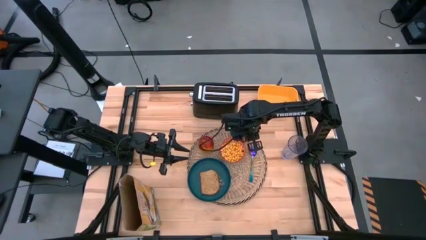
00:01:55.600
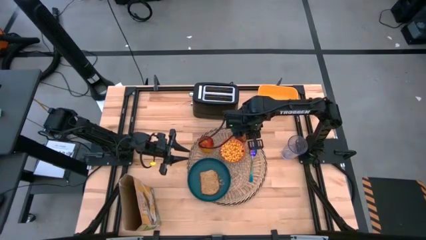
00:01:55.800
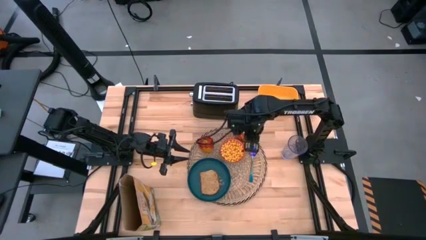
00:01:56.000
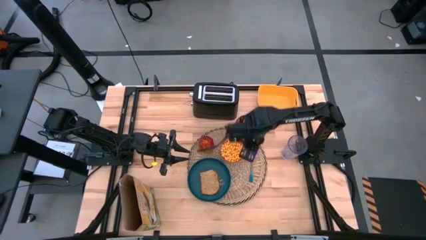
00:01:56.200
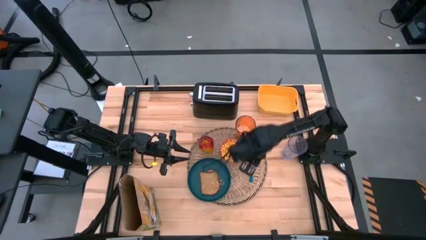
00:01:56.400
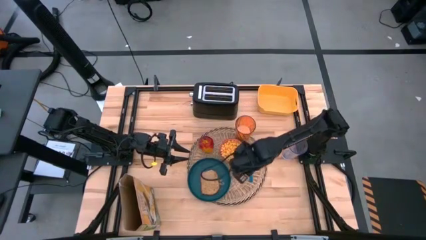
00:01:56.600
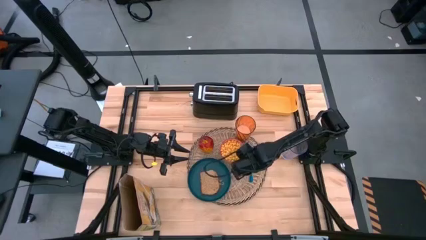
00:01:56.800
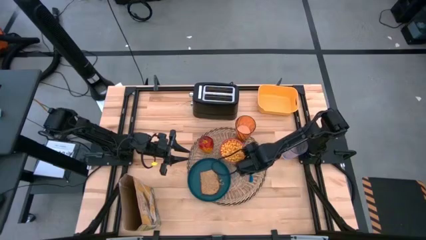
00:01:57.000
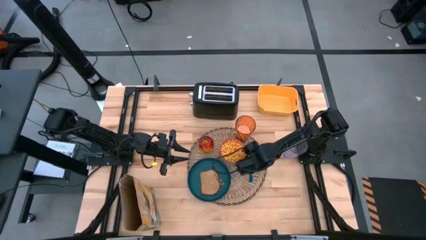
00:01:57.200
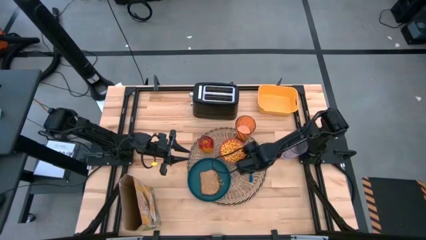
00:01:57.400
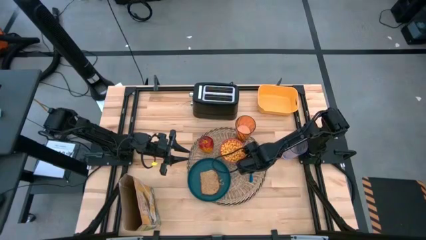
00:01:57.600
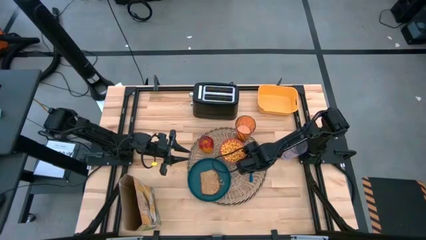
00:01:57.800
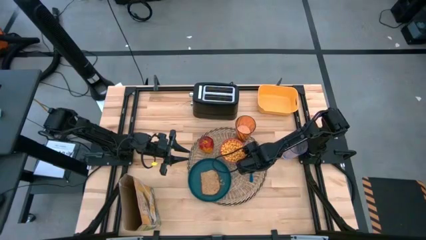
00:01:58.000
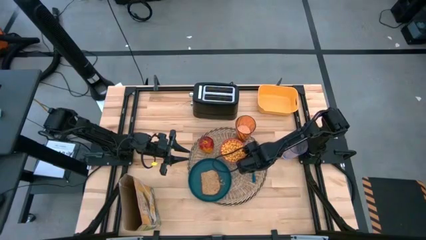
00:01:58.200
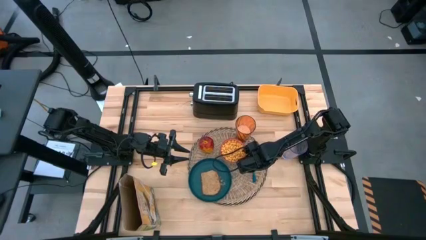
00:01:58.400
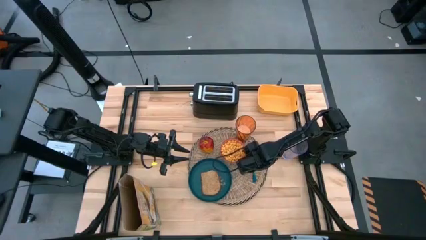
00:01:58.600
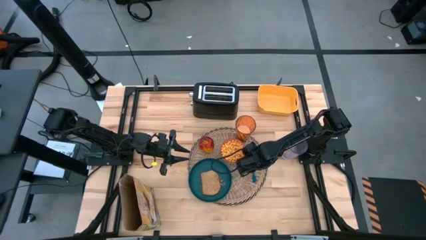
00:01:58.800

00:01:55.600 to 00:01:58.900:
Task: Arrange a breakfast setting
Adjust the blue spoon on the brown table mat

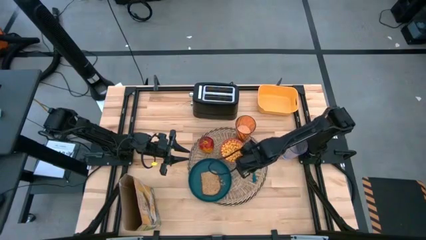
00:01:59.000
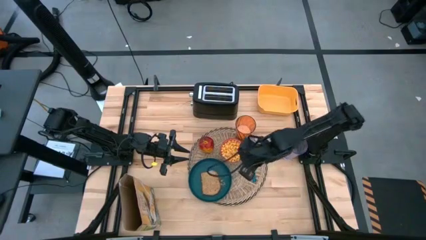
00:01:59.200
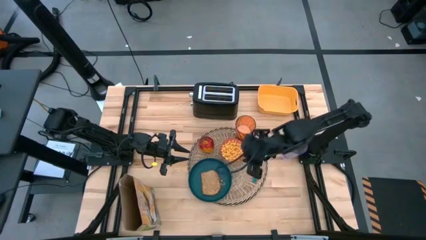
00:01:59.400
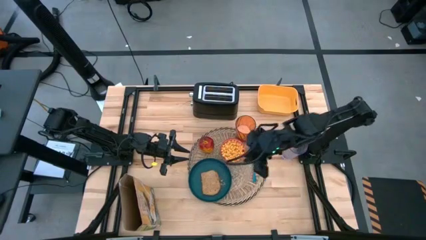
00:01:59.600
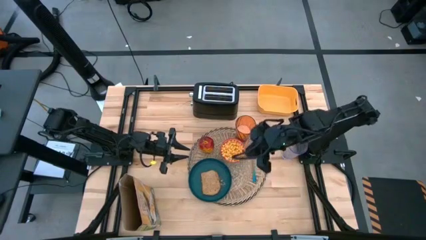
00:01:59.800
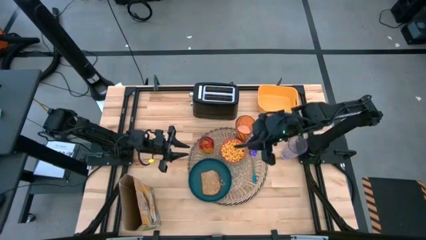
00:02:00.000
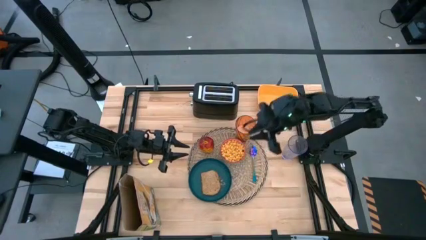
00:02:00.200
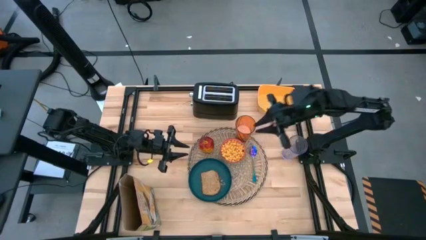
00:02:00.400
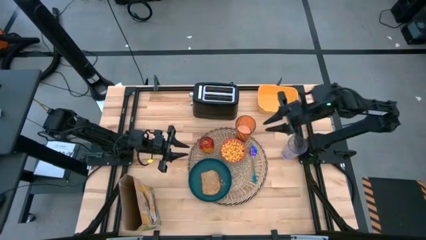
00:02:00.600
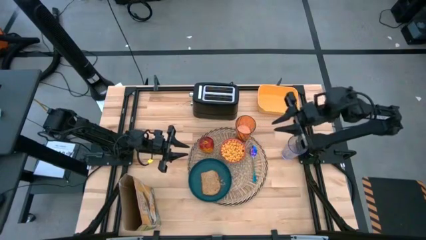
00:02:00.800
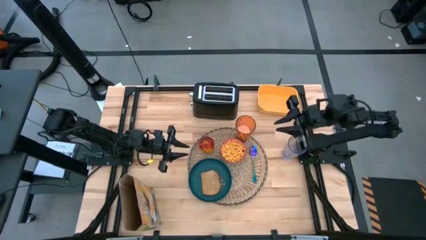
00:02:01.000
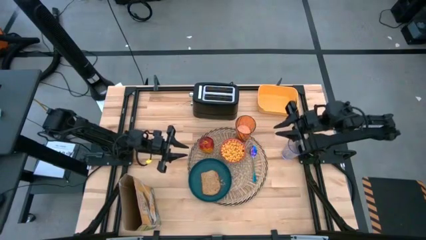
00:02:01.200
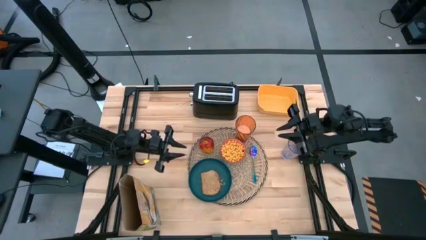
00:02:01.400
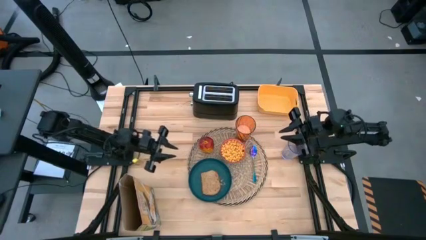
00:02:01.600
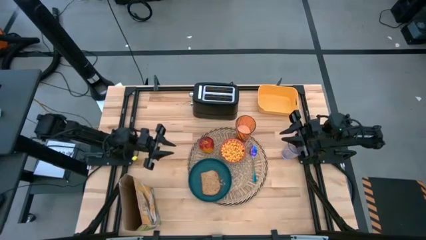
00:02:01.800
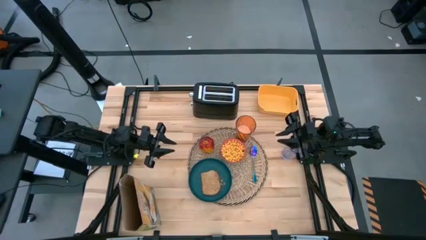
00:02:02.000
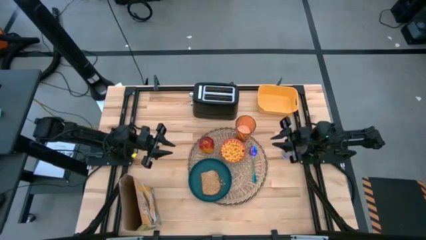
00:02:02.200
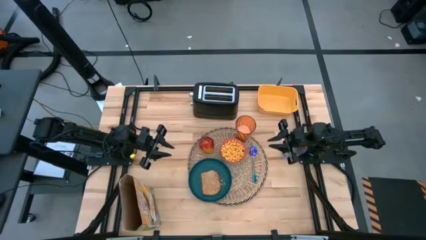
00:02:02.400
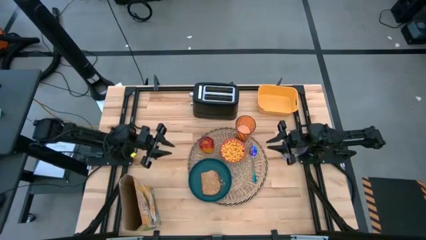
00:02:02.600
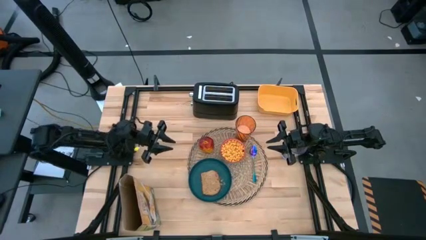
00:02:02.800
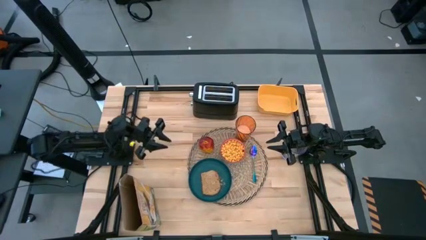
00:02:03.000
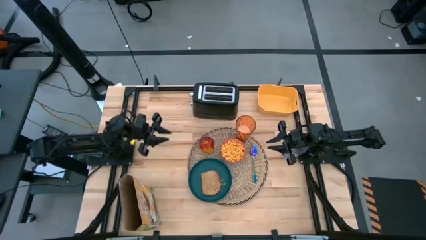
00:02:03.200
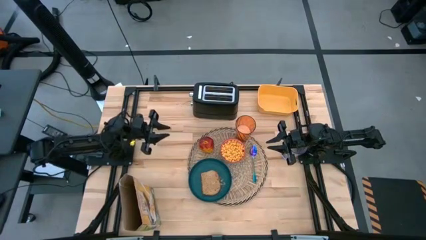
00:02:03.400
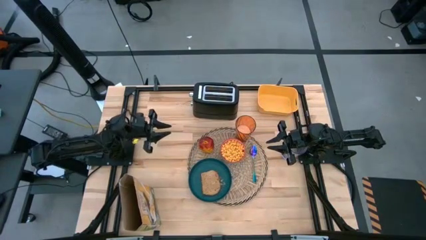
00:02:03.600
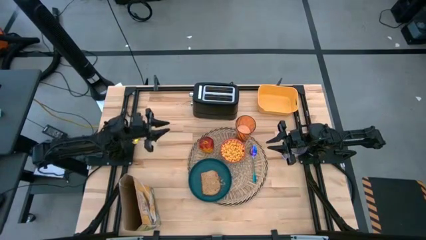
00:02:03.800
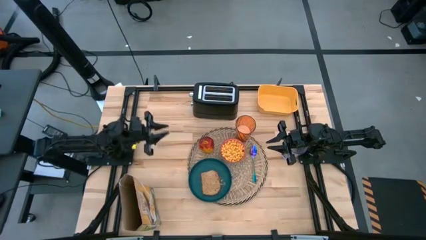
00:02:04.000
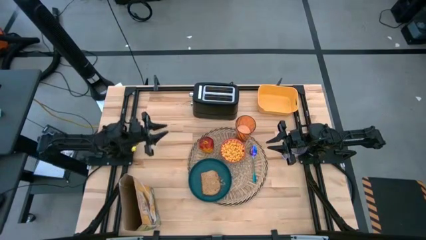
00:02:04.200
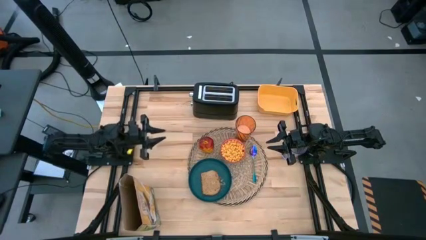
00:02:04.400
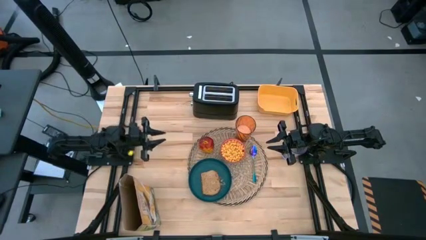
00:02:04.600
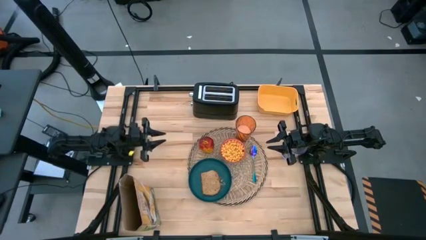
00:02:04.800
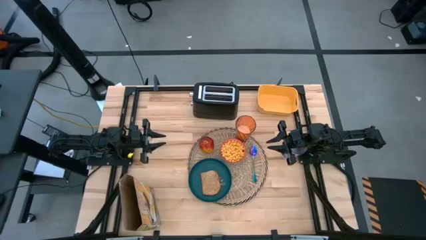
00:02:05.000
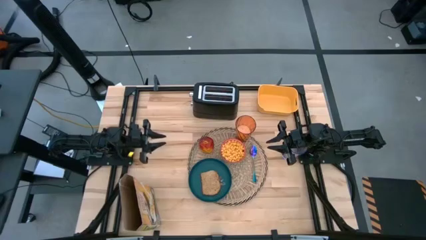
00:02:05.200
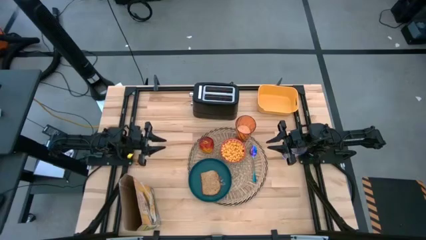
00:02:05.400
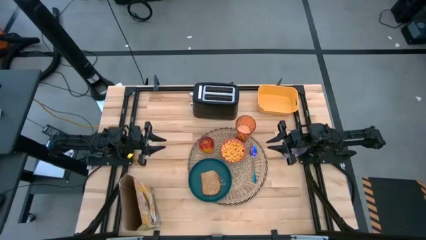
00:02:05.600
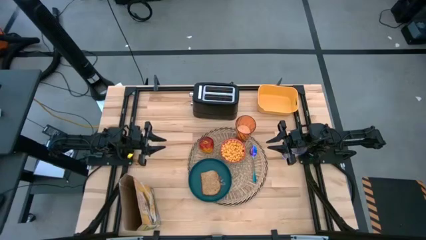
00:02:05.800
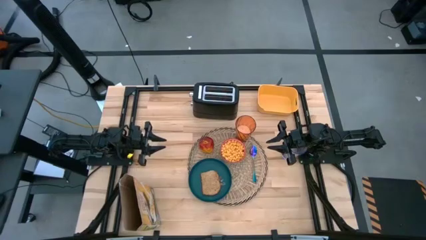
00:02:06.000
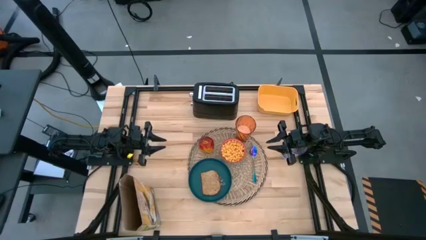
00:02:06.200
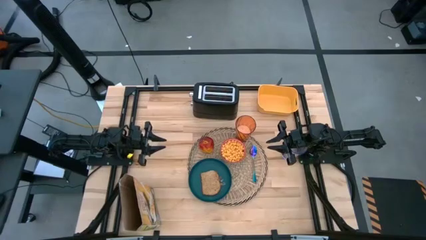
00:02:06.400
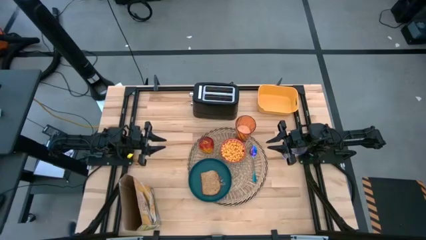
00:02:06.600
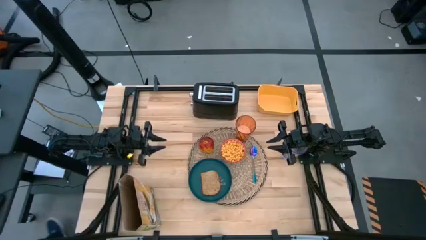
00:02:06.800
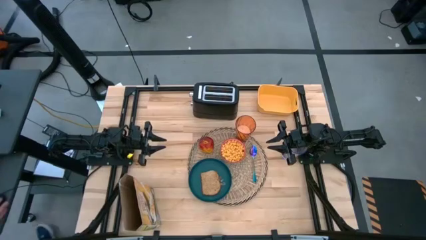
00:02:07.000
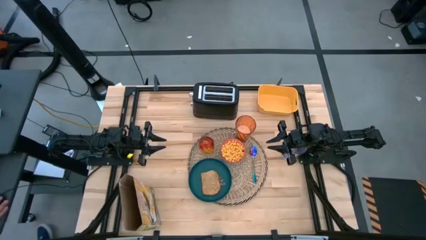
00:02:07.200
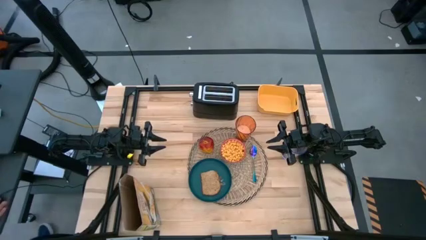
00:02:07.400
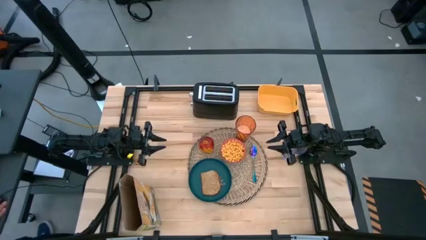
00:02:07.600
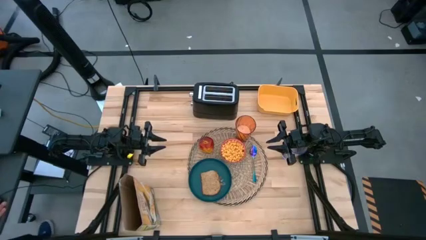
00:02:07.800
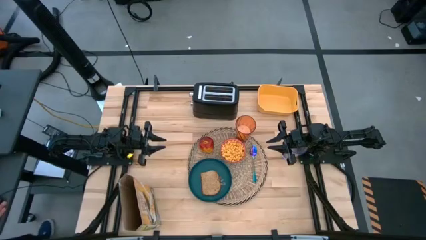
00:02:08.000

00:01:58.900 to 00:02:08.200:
Return to Home Position

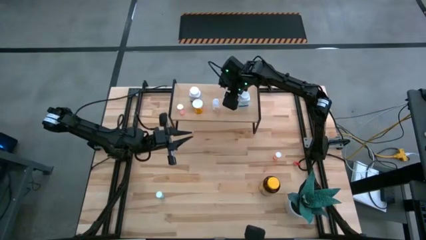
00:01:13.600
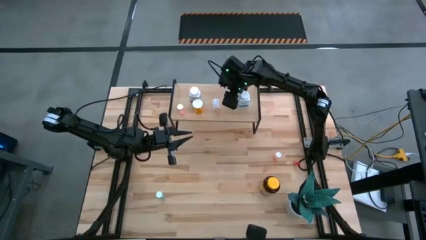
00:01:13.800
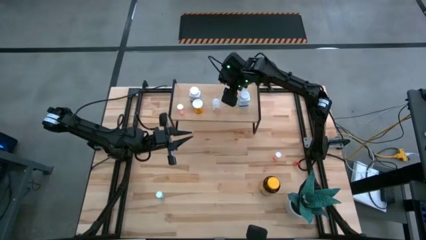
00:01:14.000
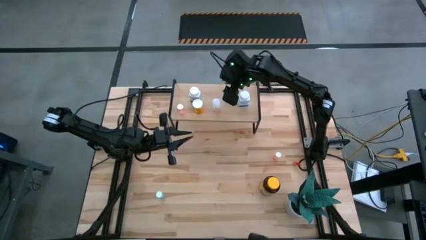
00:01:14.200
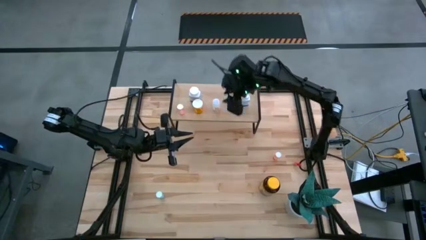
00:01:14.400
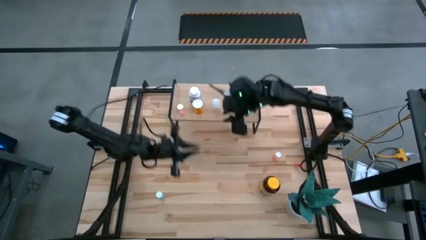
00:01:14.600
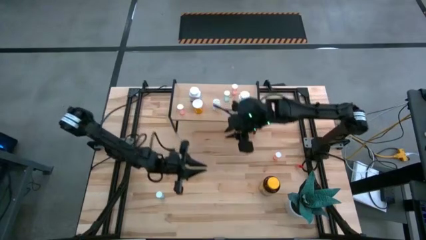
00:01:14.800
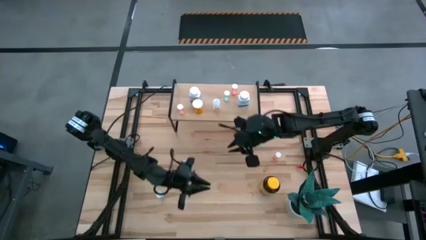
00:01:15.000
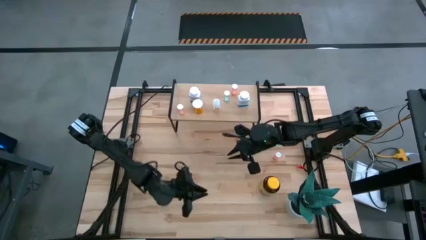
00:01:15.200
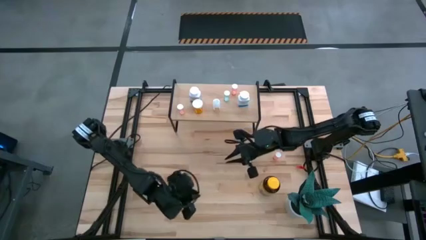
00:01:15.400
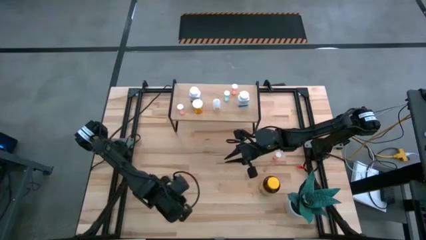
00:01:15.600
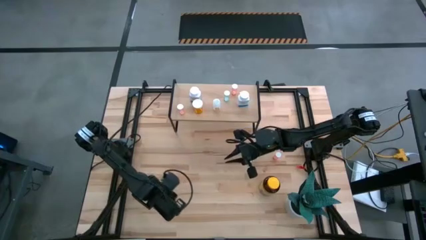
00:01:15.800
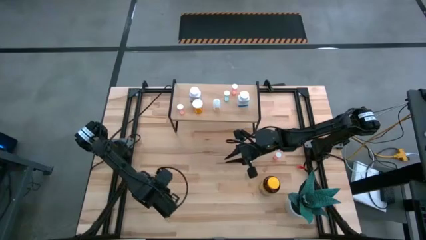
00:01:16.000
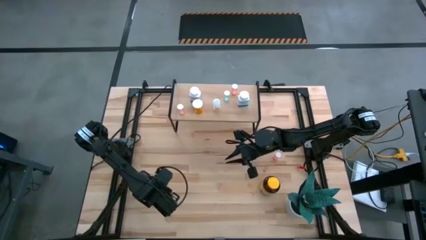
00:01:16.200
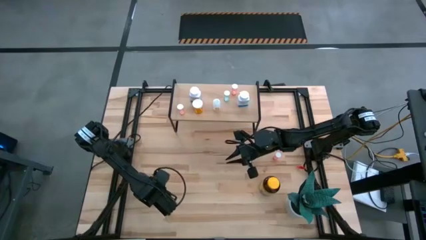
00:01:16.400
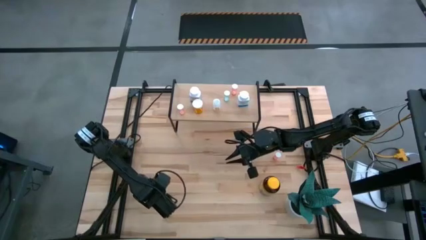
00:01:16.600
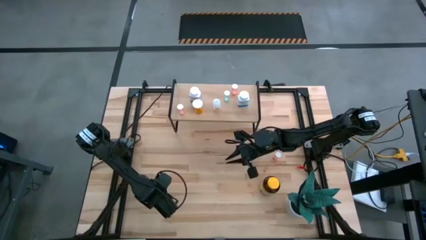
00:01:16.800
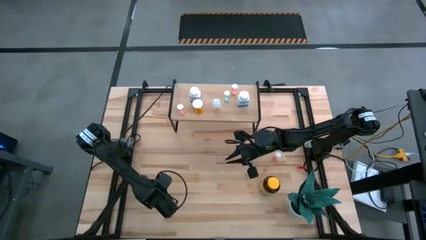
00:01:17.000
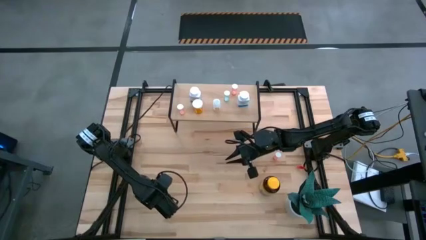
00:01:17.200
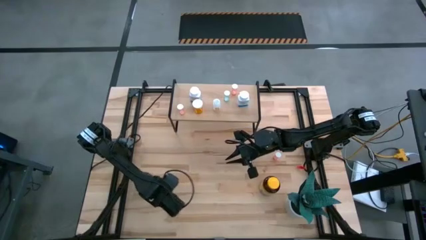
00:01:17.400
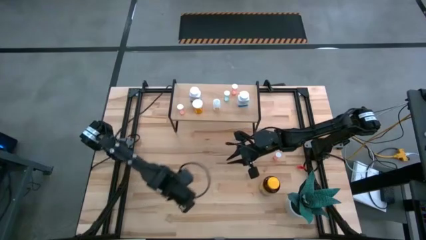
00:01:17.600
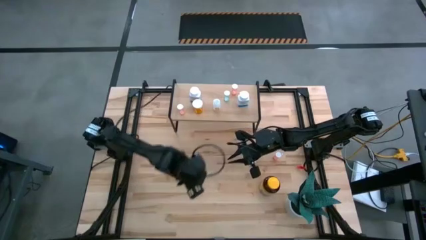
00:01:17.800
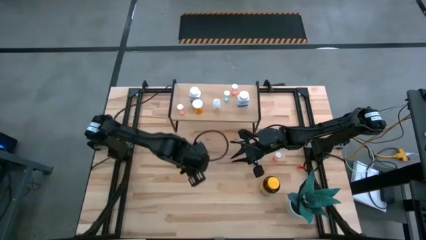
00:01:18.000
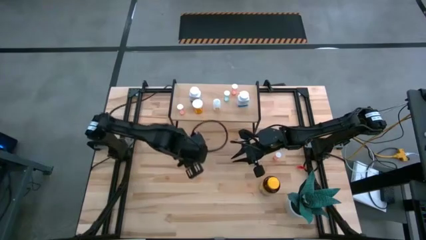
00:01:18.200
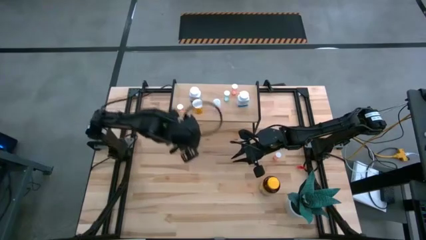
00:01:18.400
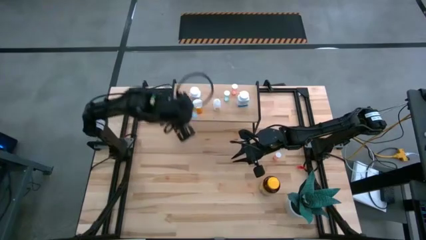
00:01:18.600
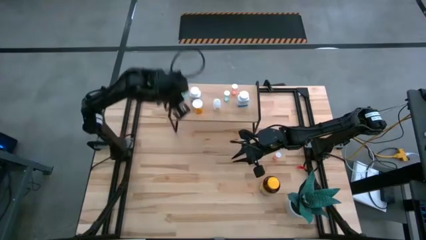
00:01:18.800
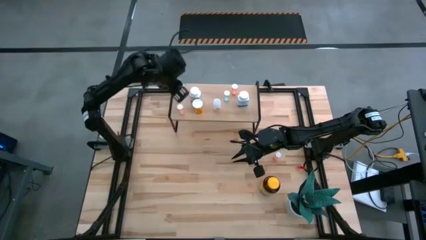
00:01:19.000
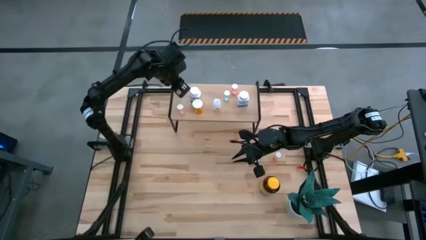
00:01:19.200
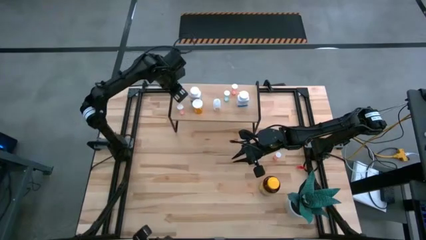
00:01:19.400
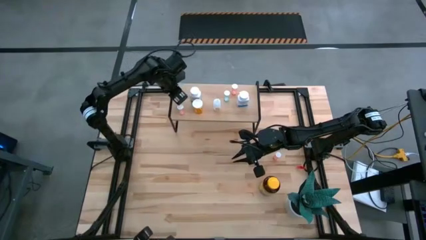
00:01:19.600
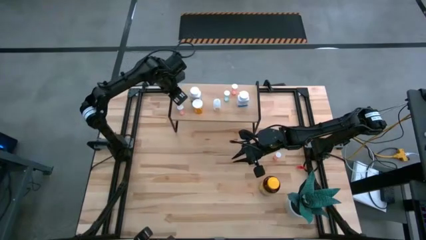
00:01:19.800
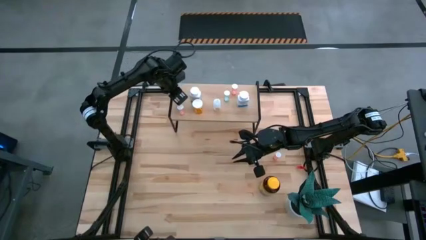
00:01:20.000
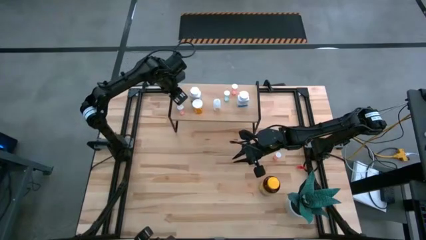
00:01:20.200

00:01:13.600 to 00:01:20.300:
Task: Pick and place medicine bottles onto shelf by color
Put the blue pill bottle on the shelf
